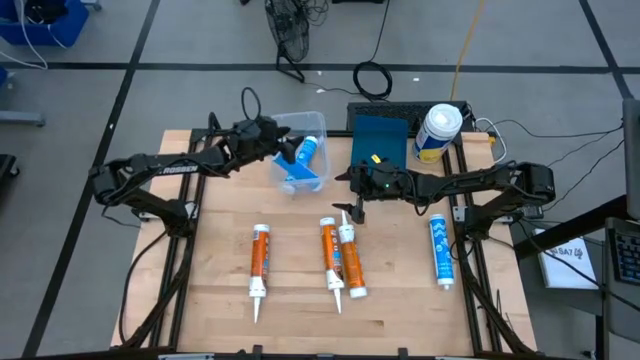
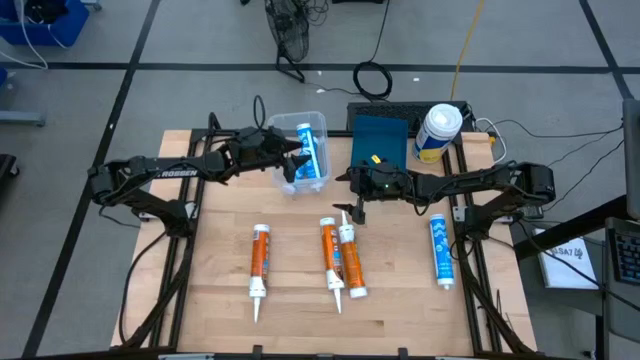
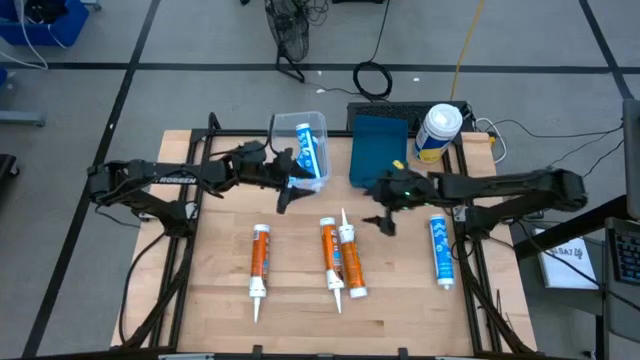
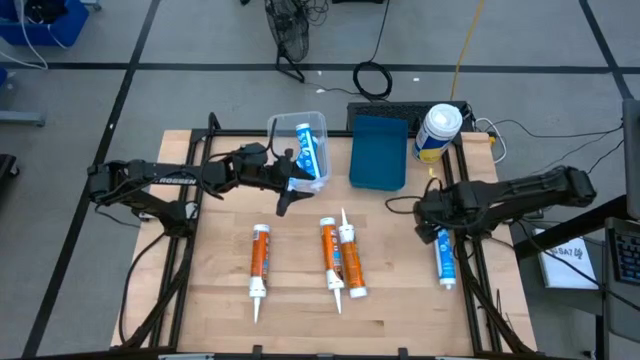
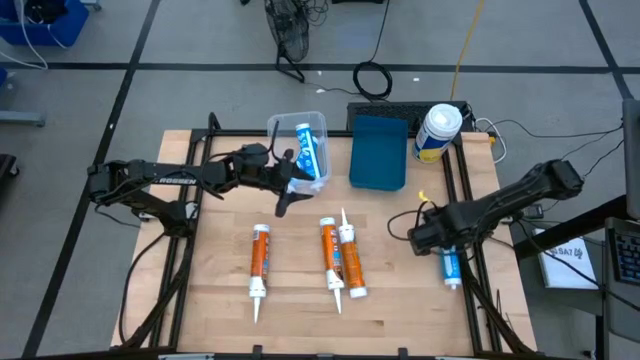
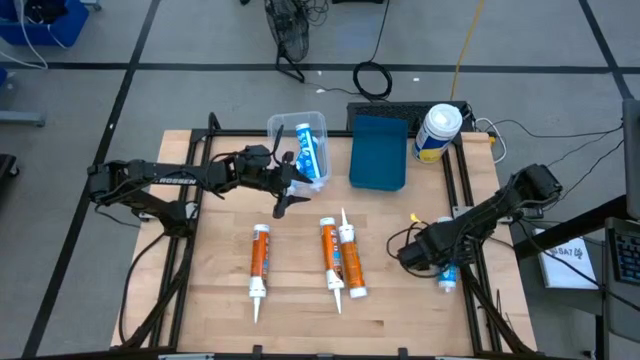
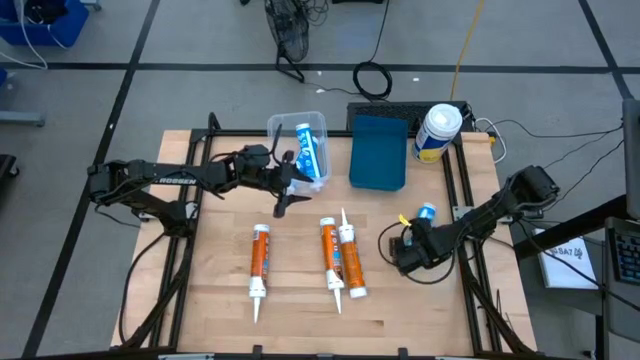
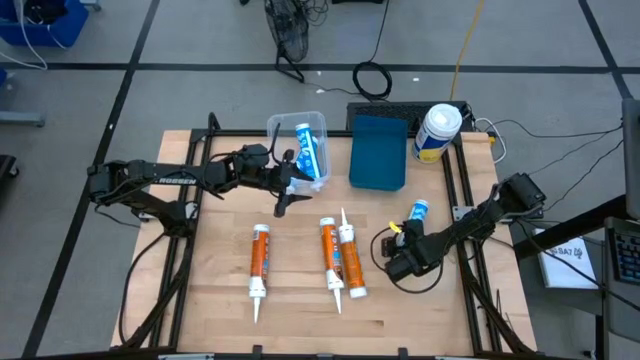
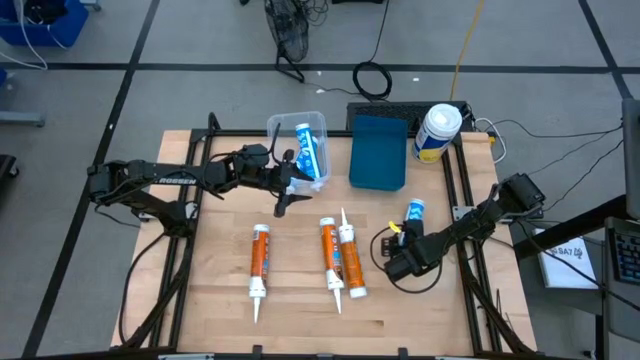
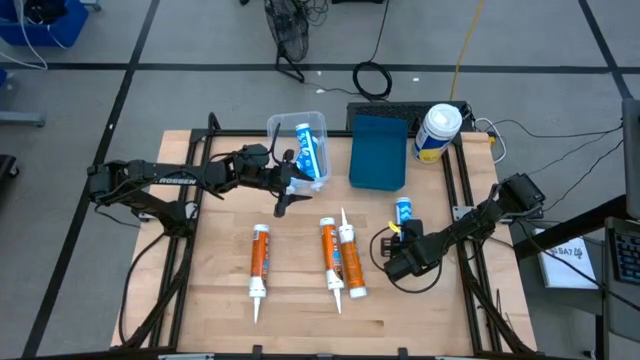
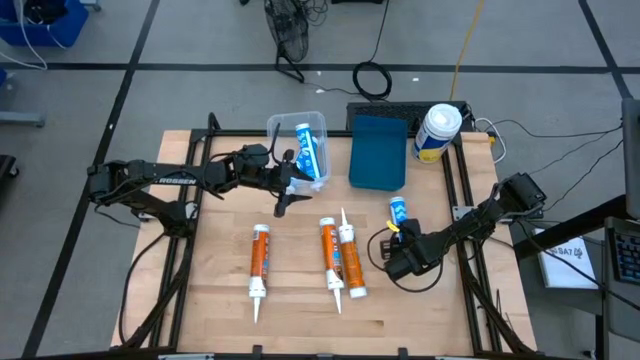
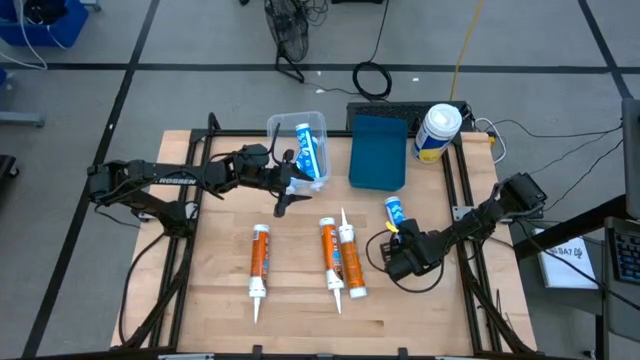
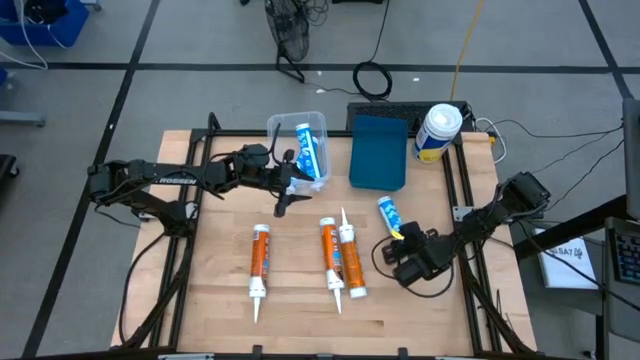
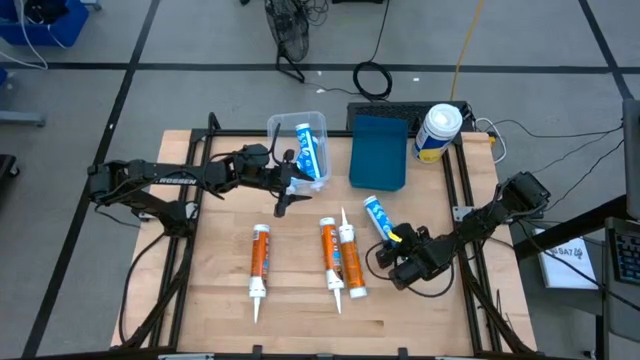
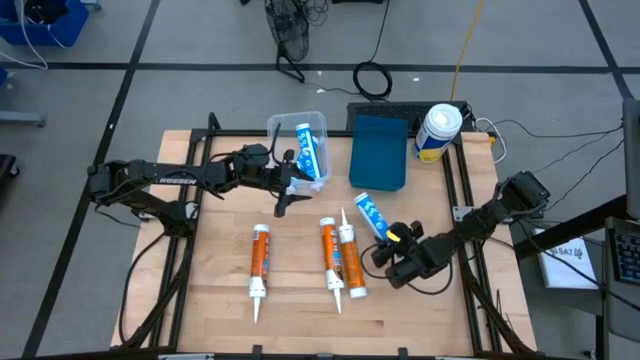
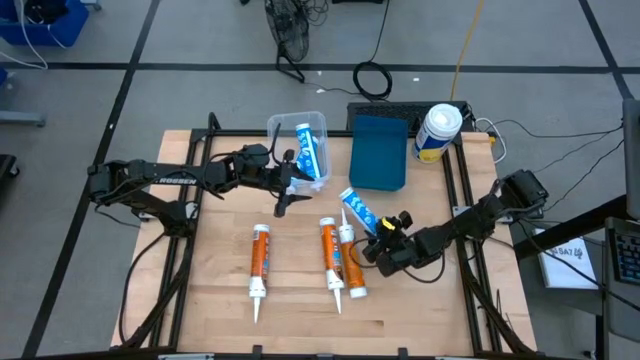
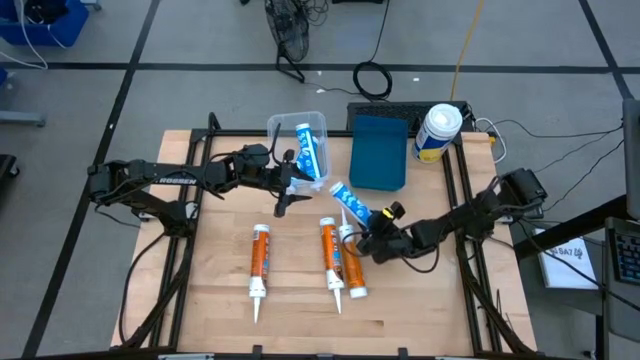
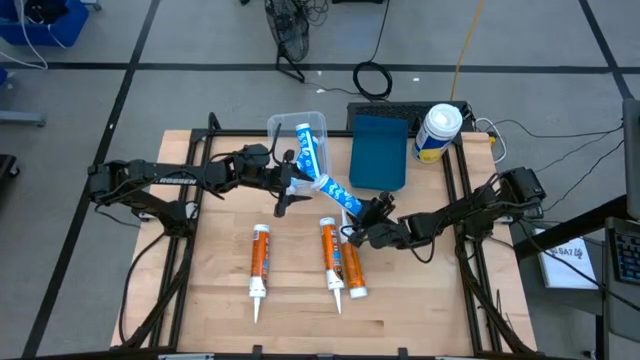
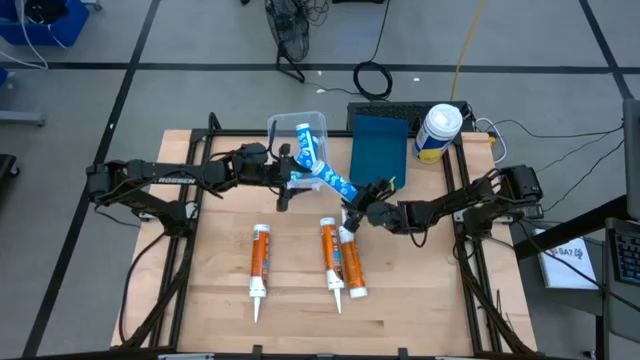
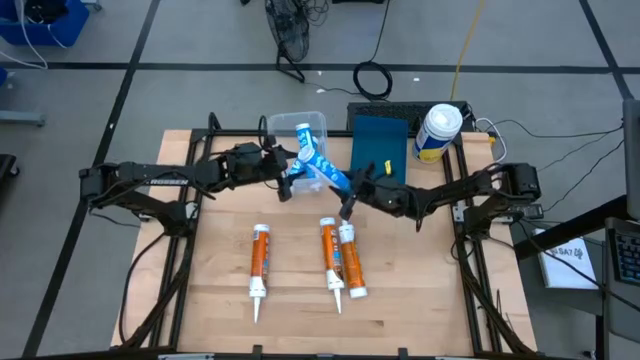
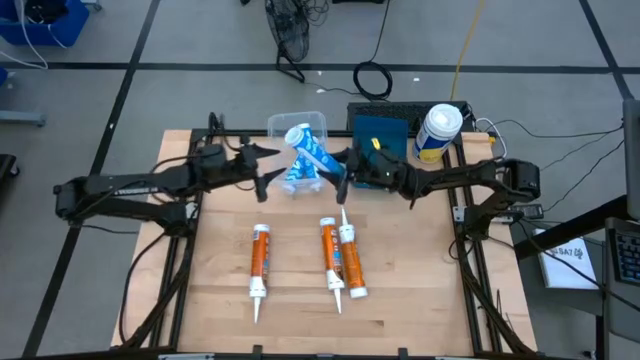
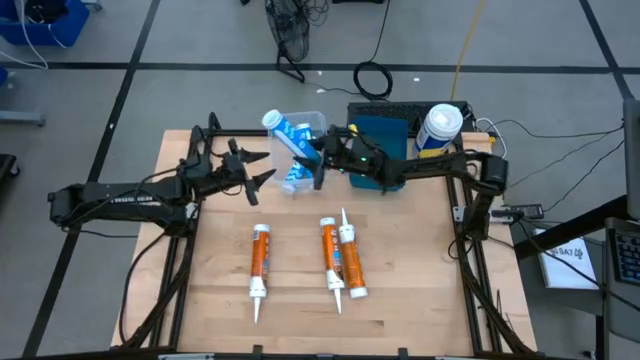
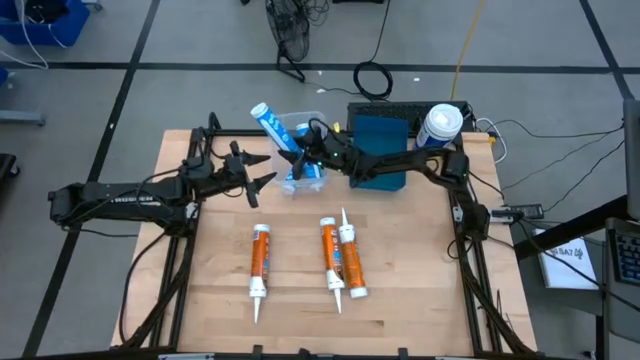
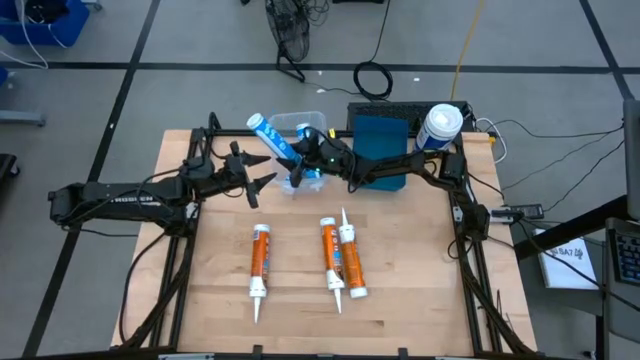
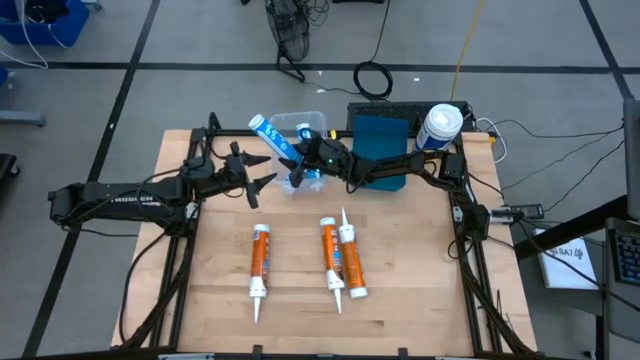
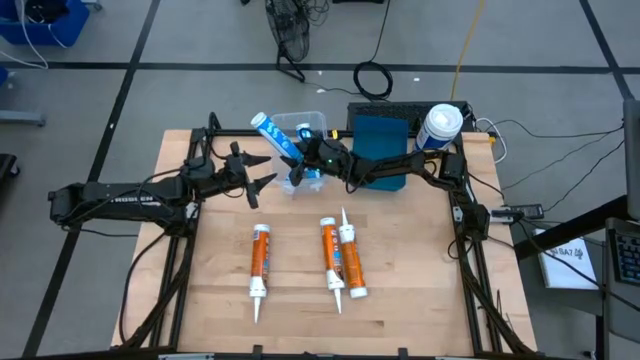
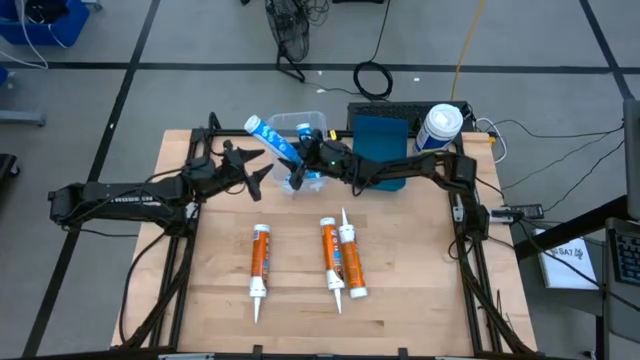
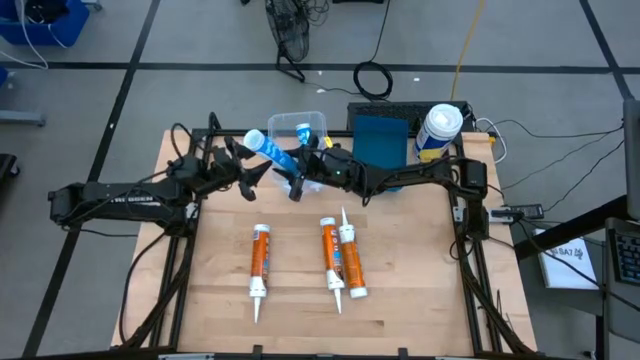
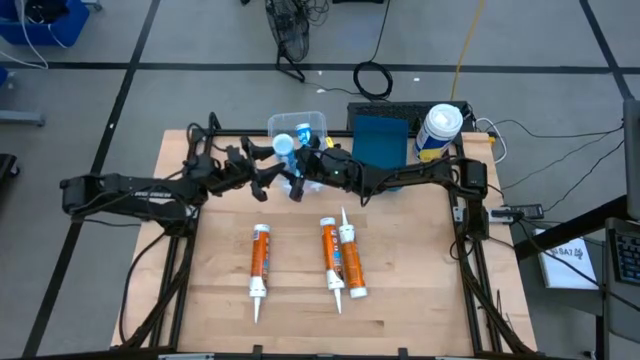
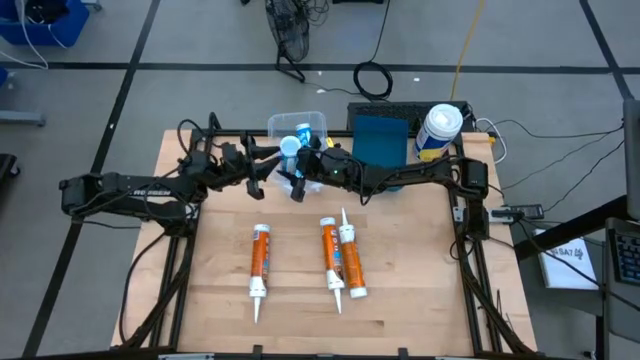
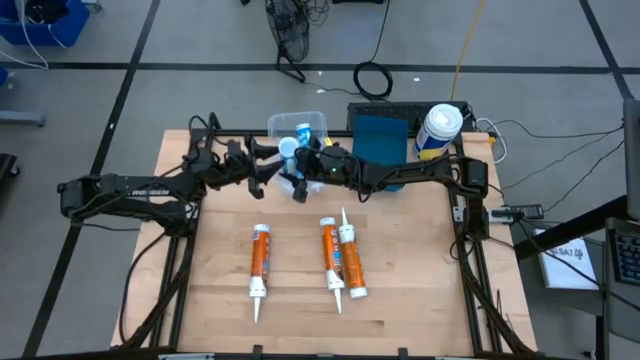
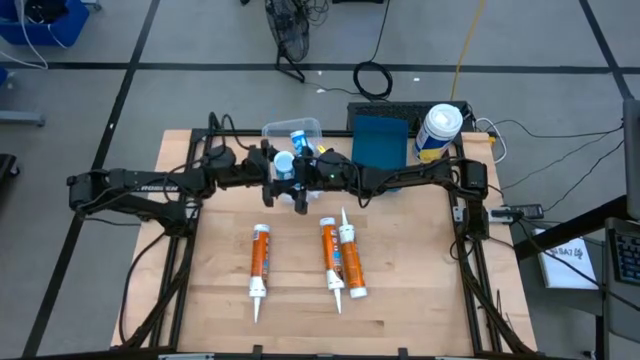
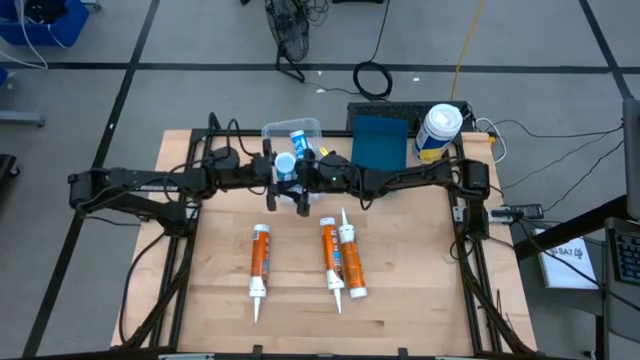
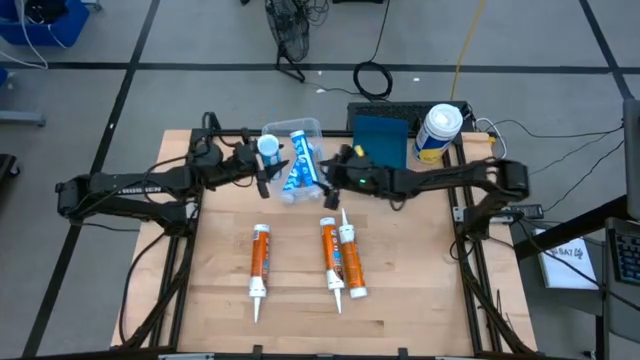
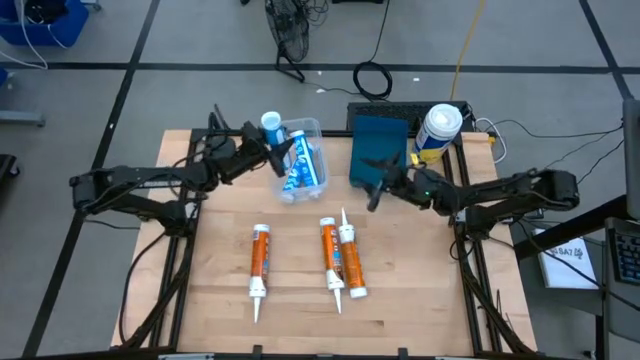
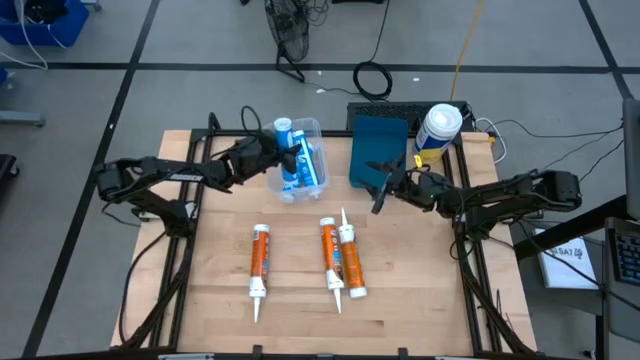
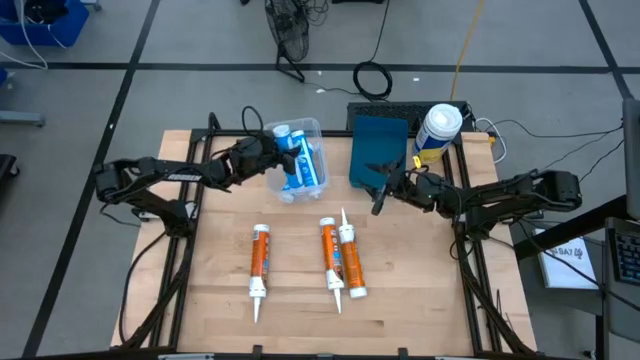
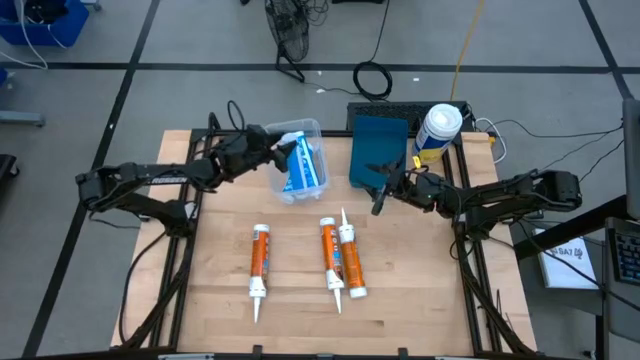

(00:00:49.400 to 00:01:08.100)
Task: Pick & place silicon tubes, Sealant and Lysol wipes
Put the blue sealant into the transparent bin

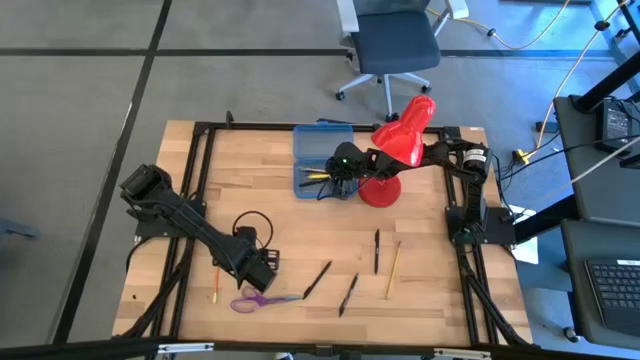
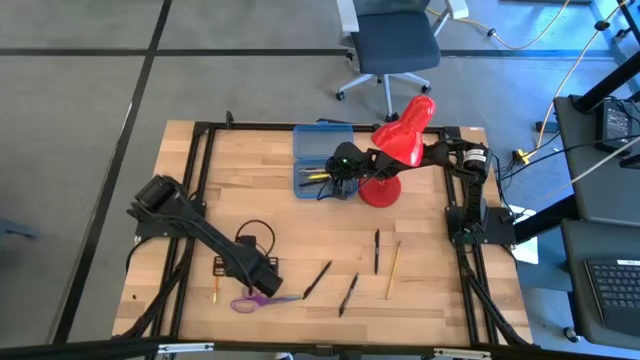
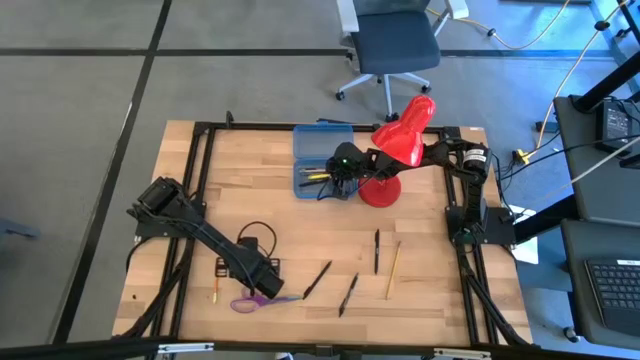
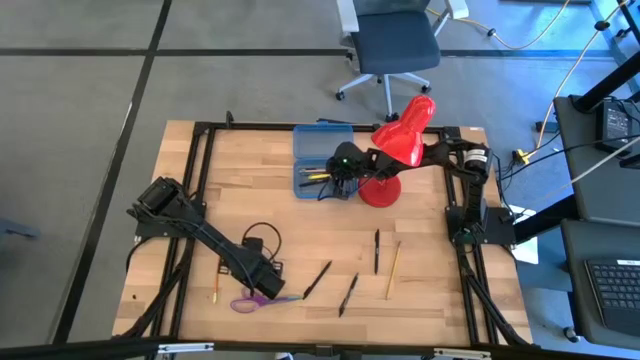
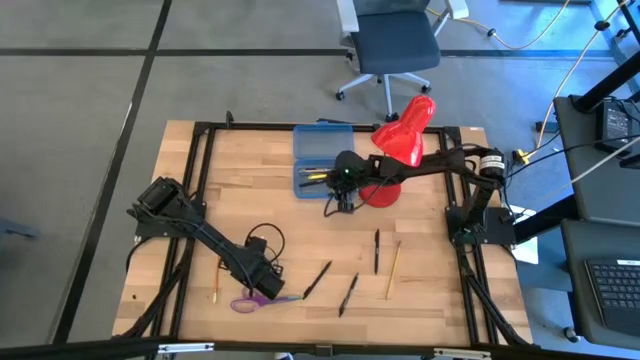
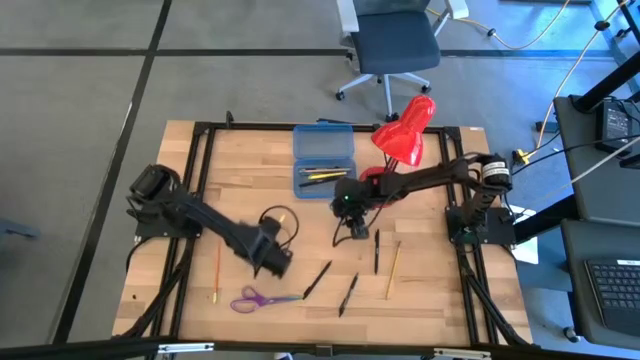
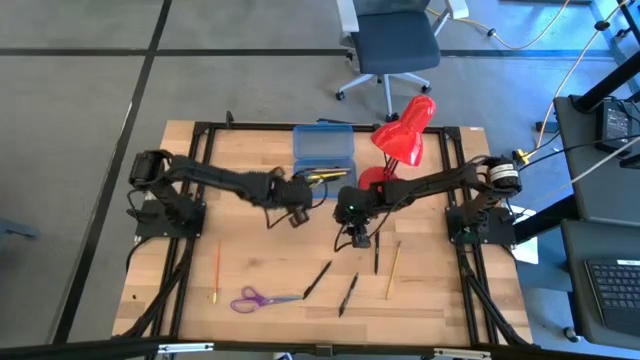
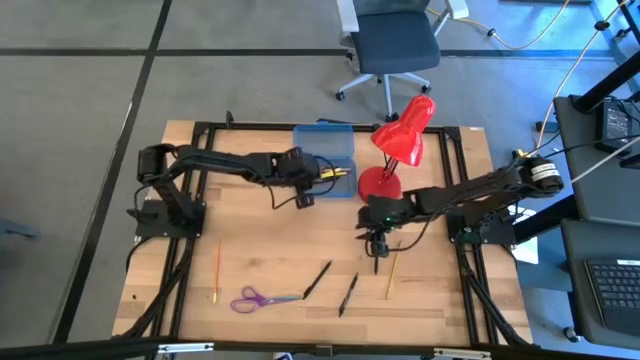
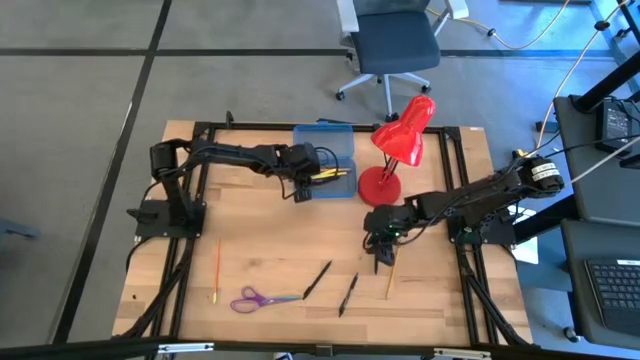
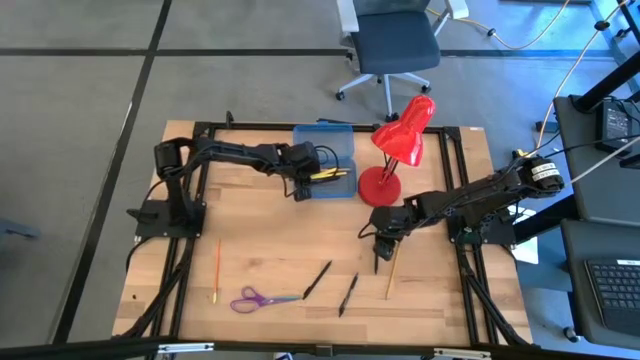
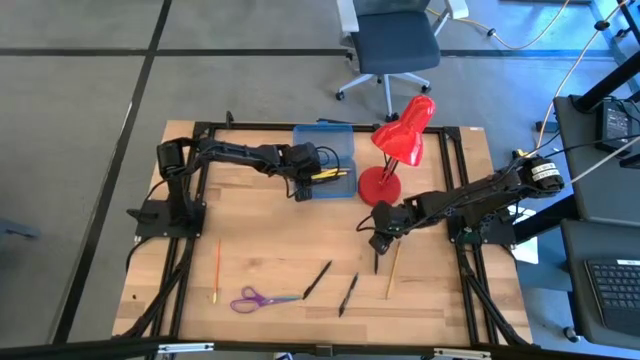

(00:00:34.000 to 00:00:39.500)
Task: Pick & place school supplies into a supply box
Put the yellow pen into the blue supply box
